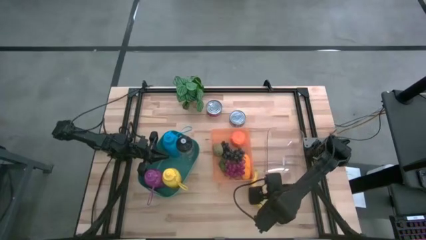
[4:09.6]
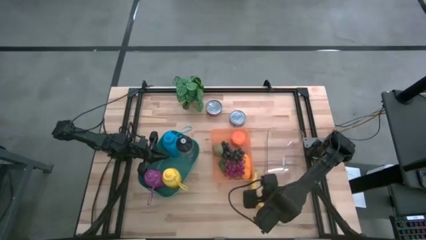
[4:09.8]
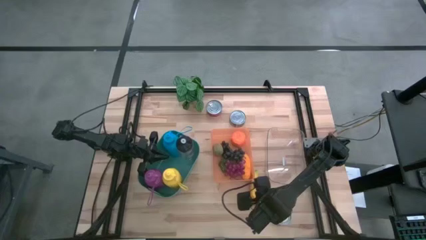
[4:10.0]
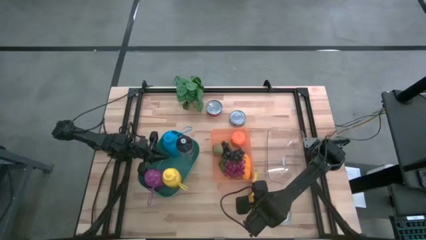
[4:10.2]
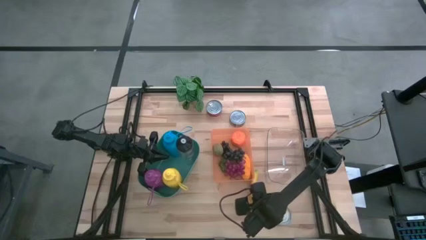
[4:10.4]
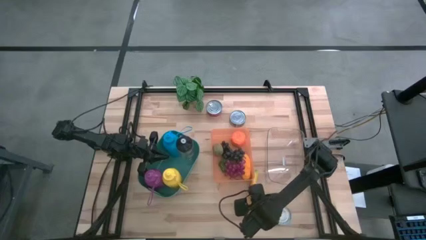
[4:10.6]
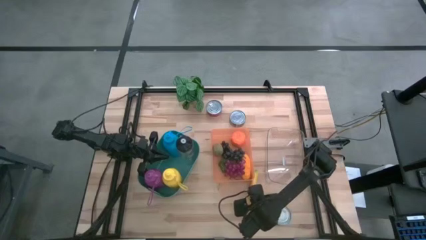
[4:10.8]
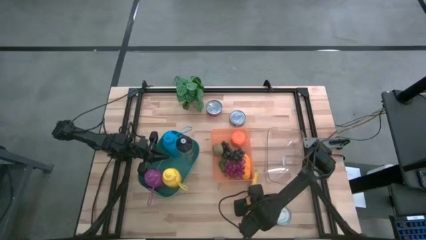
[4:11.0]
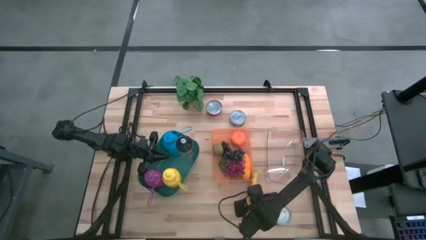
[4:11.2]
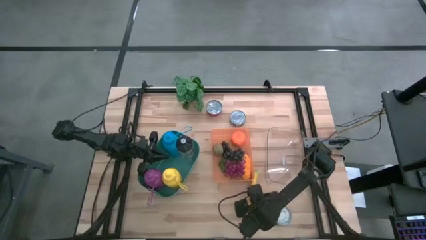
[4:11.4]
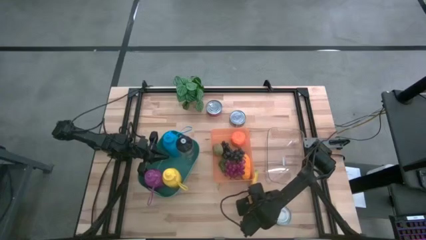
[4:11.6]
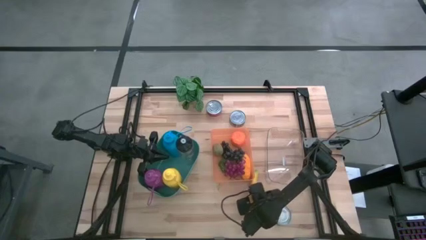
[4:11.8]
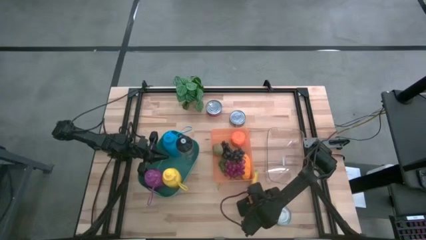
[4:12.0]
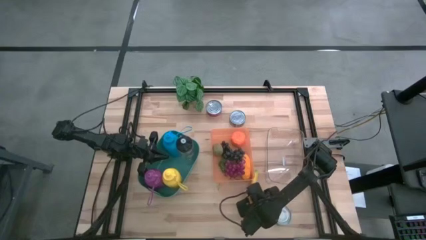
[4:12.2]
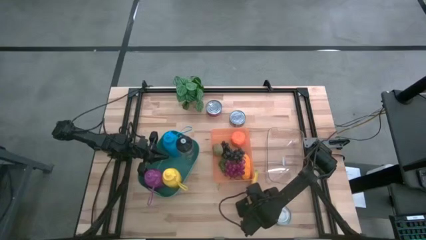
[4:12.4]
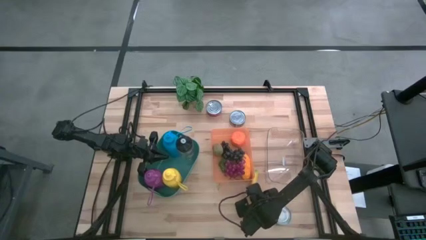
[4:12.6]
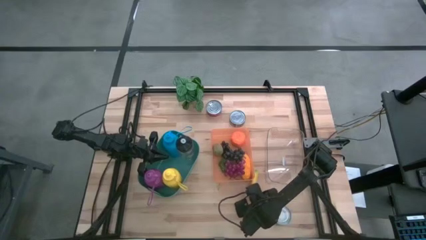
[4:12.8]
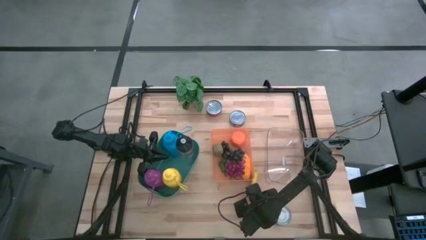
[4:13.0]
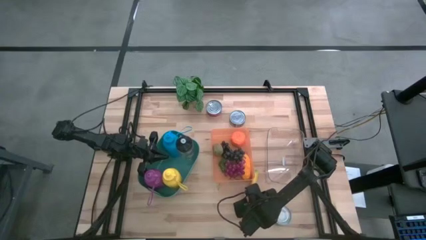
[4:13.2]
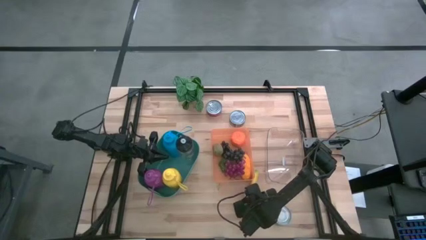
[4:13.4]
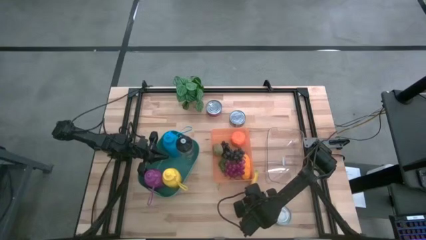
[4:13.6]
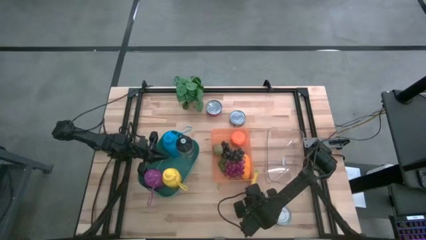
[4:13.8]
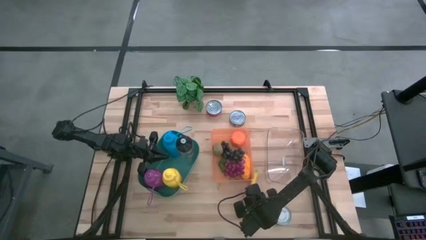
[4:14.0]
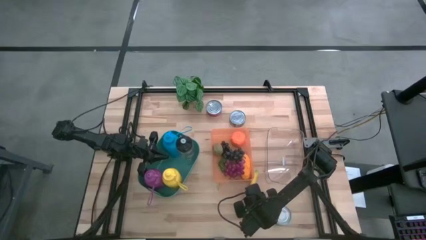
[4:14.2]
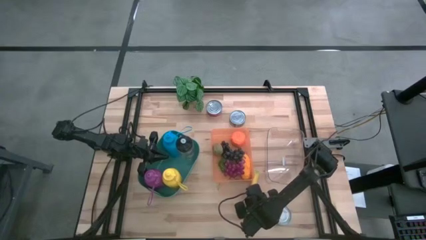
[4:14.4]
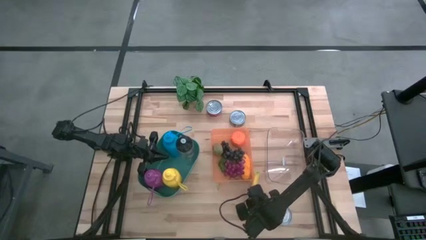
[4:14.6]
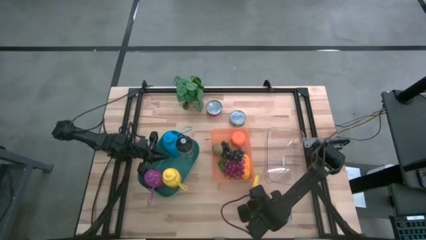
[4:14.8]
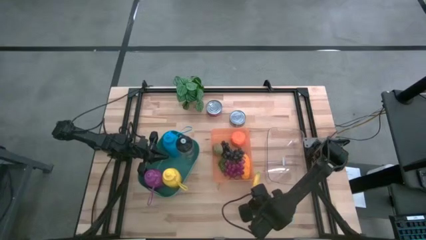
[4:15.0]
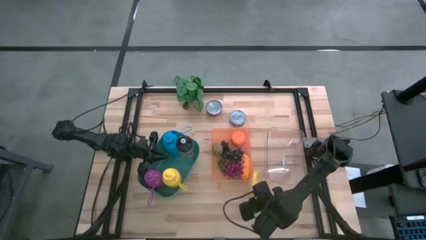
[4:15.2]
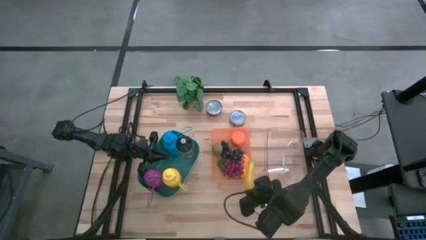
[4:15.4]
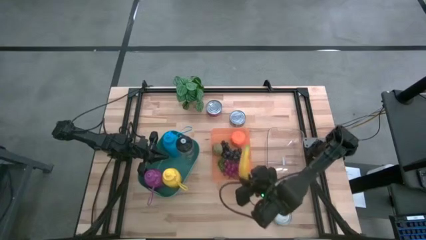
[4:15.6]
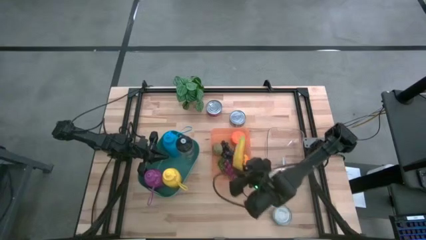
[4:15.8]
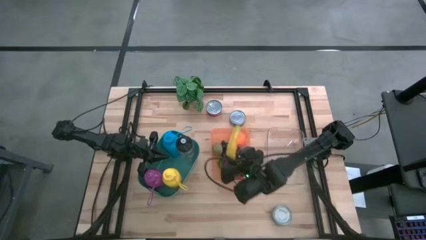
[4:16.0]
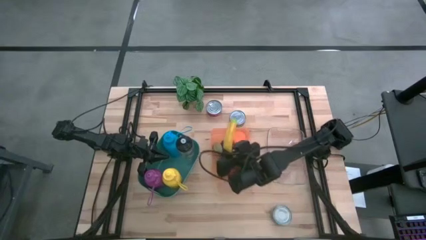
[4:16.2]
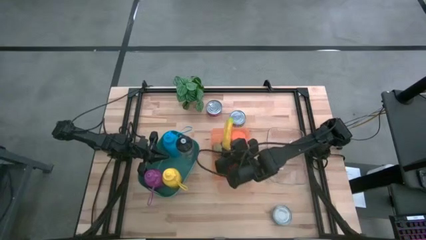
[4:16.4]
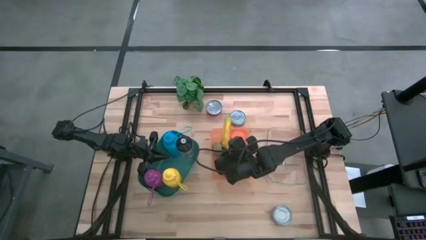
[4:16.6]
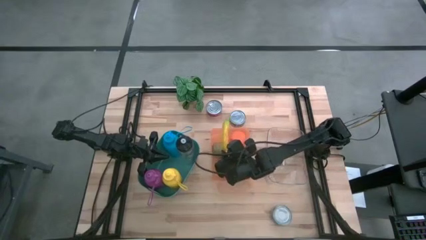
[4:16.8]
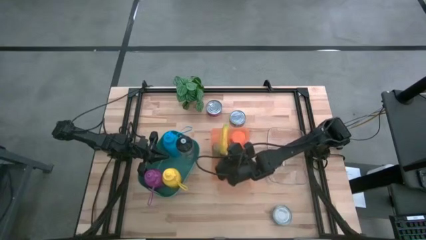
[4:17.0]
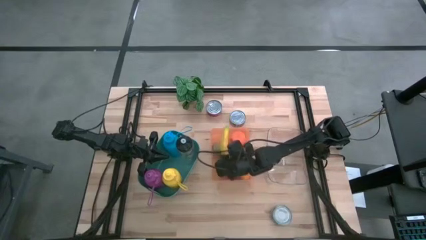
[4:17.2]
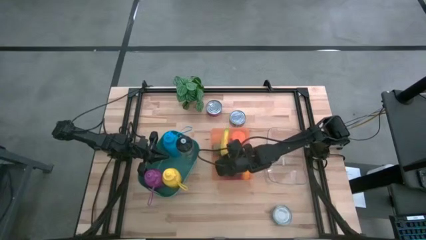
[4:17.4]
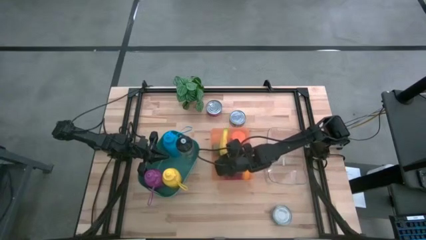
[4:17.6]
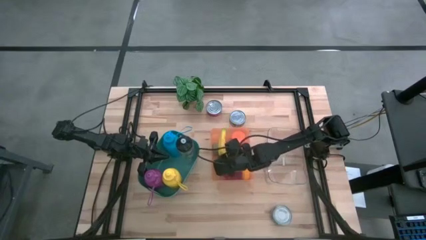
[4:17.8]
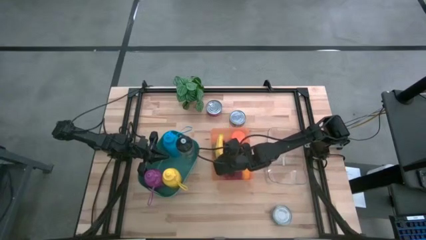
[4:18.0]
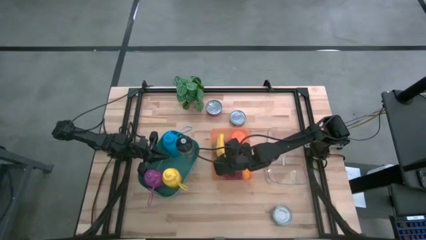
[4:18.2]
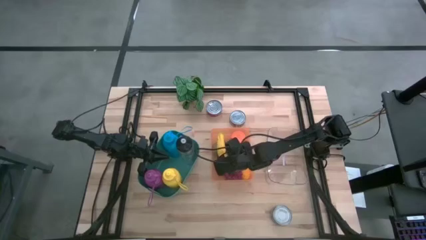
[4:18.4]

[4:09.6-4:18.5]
Task: Pick & Place Food Item
Put the yellow banana into the orange bin

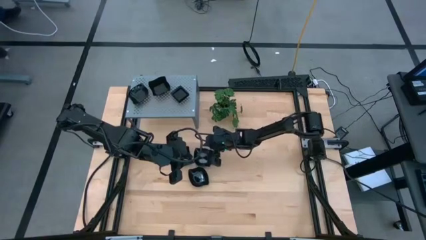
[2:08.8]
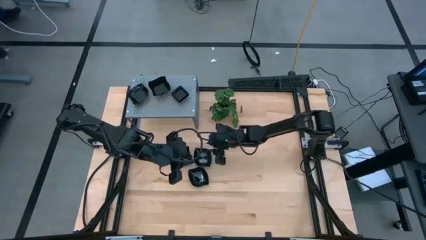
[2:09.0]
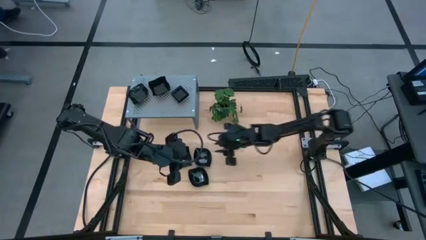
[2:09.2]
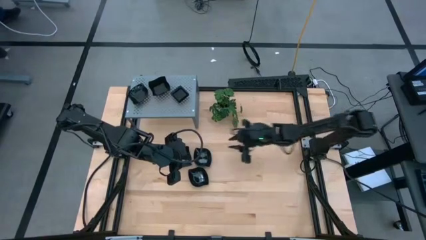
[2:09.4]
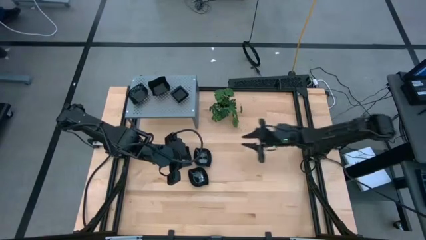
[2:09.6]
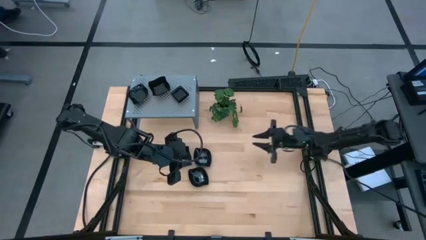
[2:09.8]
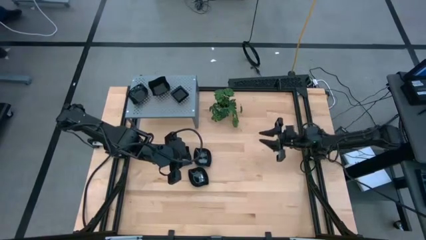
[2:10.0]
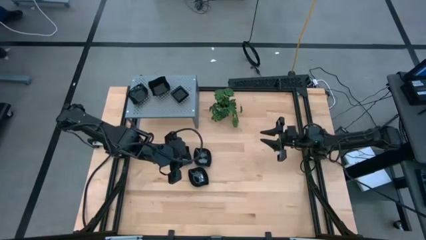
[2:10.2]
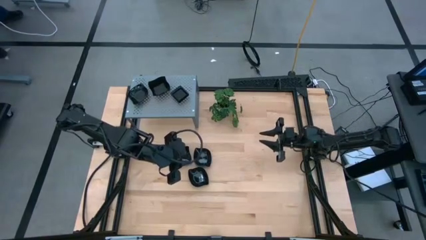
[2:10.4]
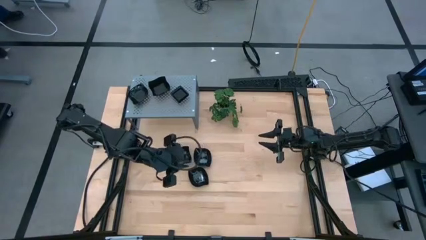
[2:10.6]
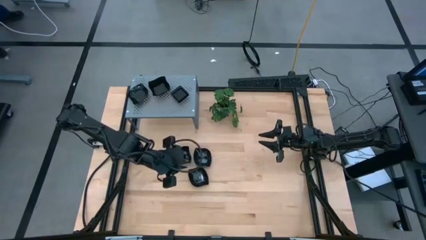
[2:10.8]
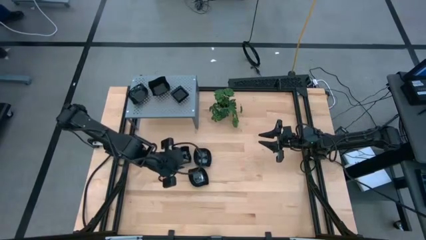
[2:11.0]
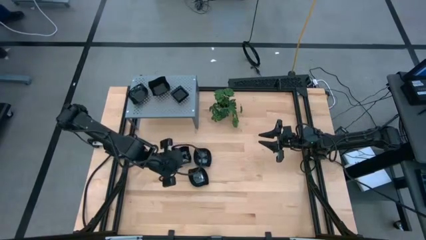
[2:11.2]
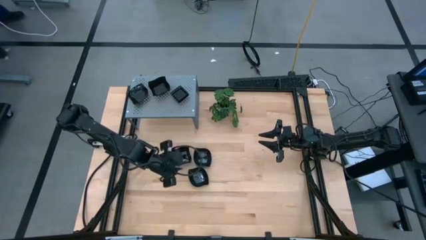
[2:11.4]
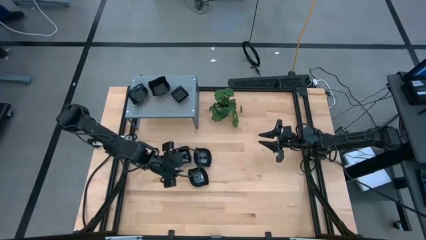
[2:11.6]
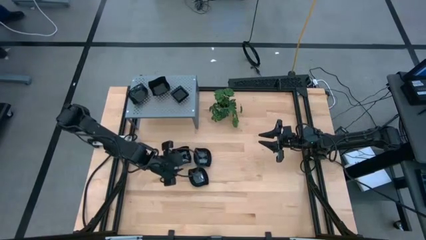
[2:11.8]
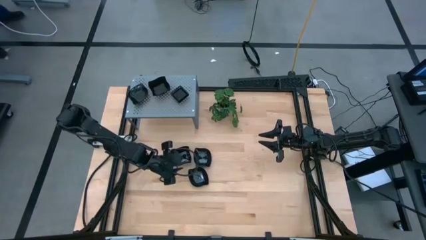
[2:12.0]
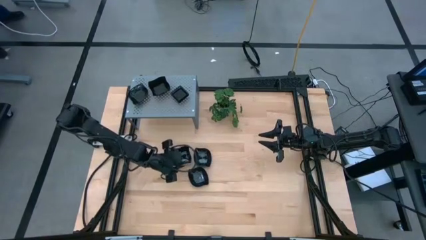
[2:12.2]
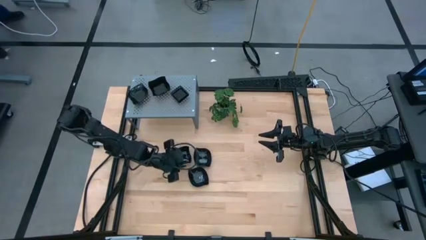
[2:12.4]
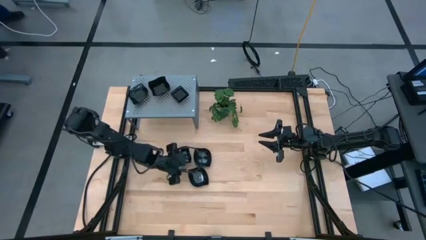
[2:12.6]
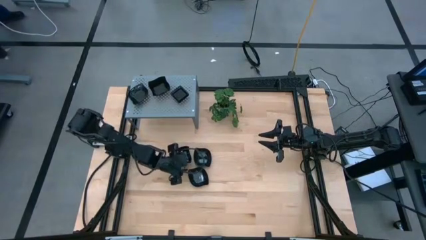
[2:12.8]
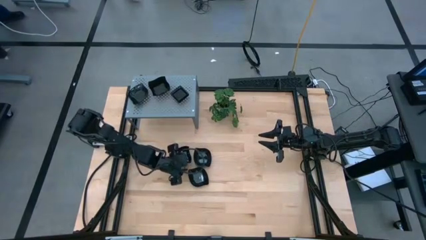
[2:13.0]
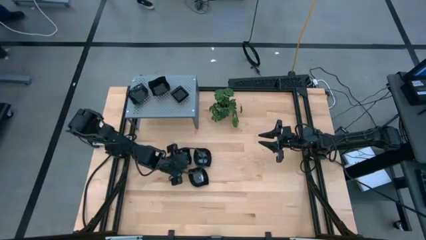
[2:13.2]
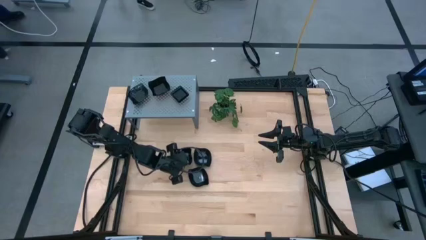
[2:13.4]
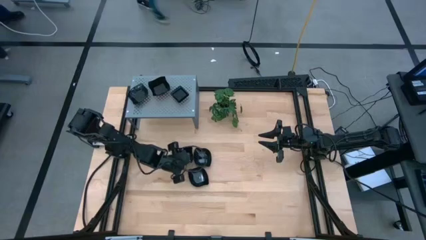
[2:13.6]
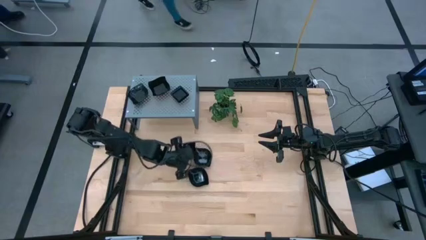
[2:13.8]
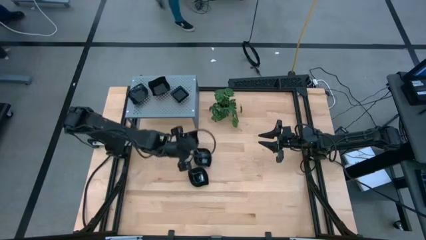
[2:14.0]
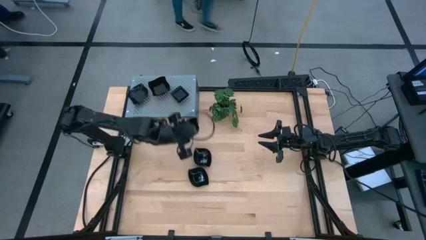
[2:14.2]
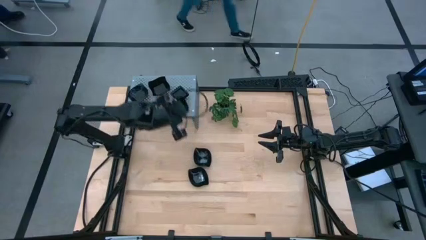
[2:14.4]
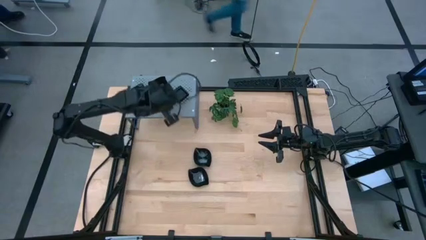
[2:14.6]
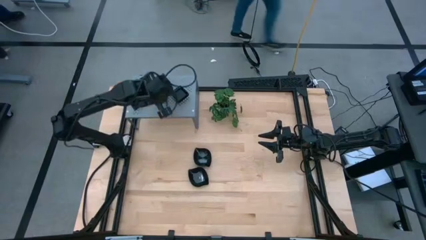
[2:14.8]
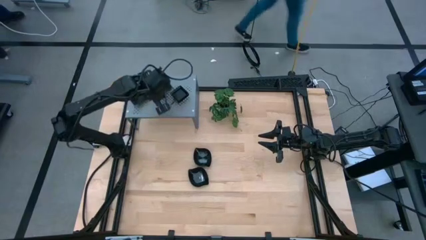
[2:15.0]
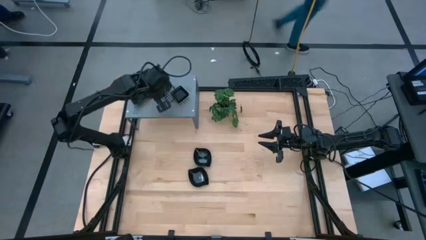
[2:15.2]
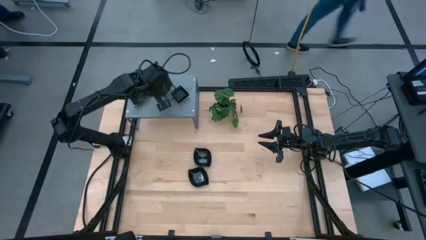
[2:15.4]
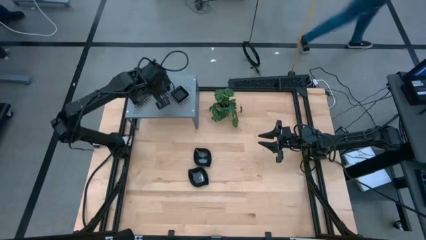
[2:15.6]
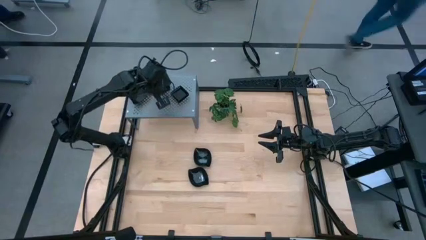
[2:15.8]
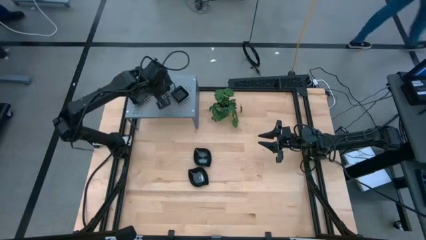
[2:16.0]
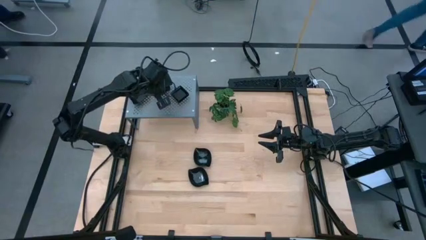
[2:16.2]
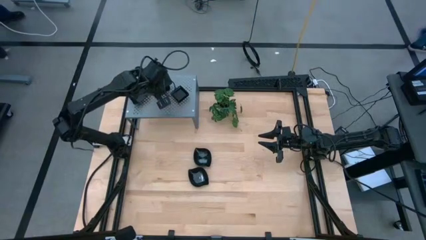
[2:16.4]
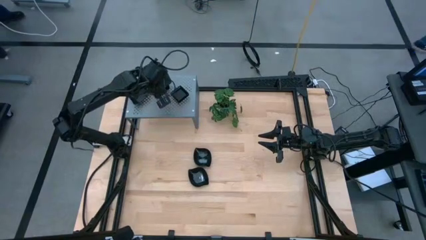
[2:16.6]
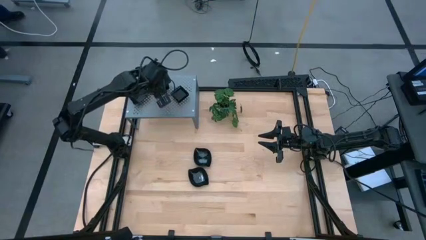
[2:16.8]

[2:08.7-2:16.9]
Task: Pick & Place Mini shaped plates
Stack the black square plate on top of the black square plate on the shelf
